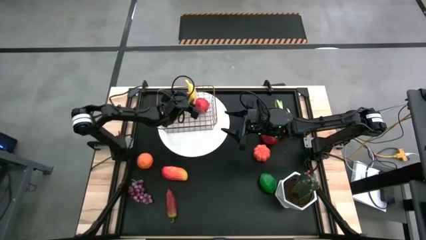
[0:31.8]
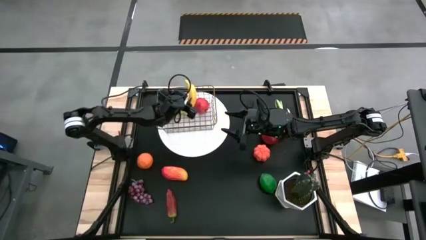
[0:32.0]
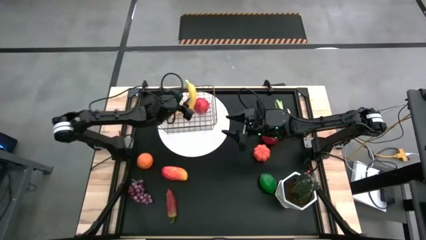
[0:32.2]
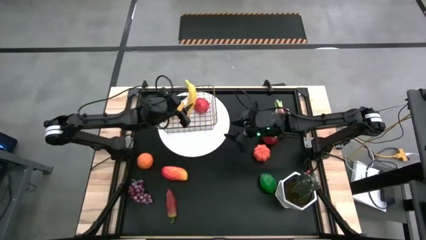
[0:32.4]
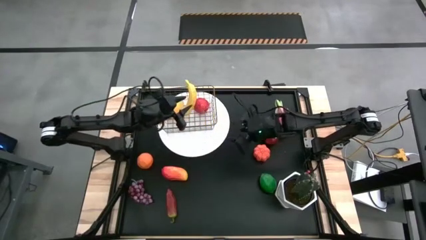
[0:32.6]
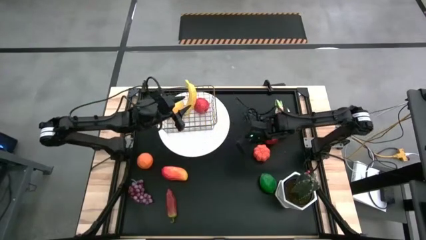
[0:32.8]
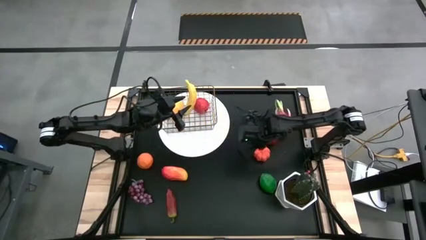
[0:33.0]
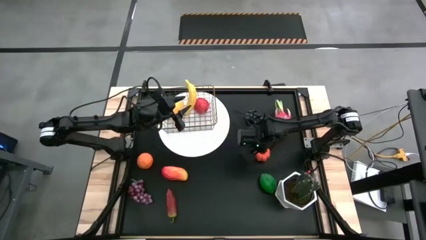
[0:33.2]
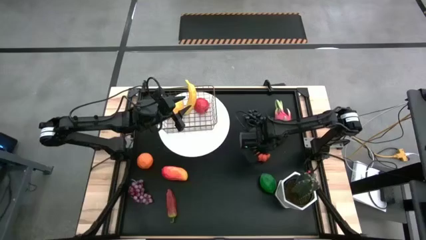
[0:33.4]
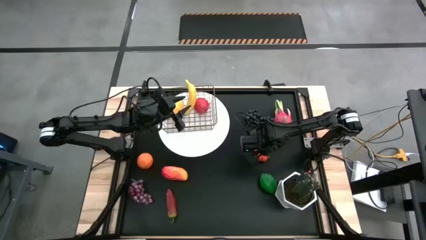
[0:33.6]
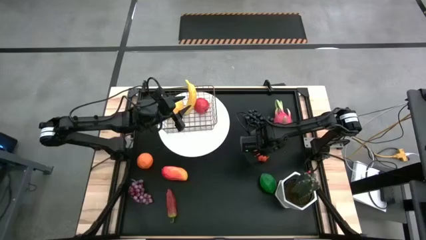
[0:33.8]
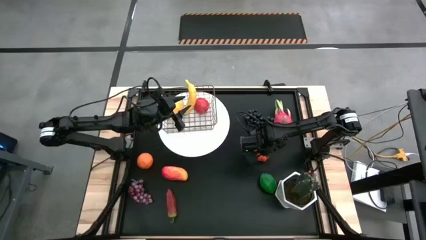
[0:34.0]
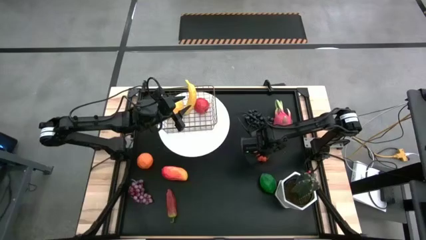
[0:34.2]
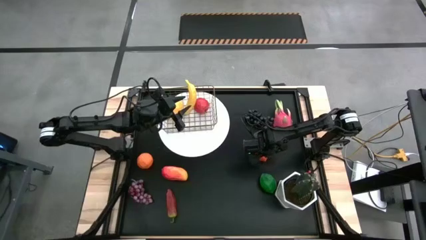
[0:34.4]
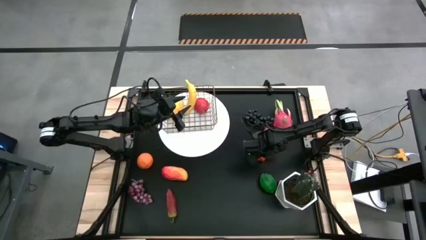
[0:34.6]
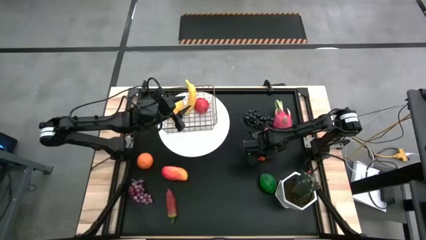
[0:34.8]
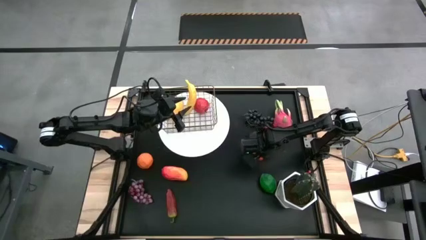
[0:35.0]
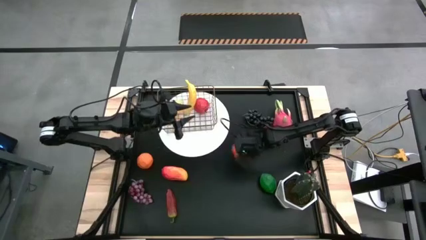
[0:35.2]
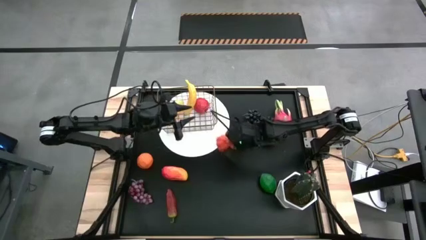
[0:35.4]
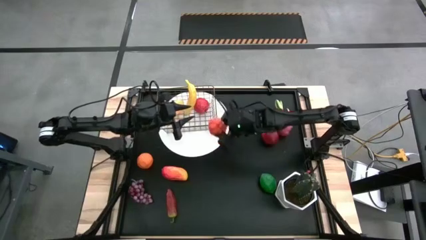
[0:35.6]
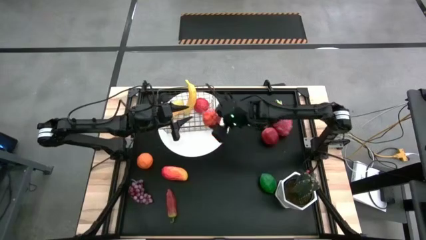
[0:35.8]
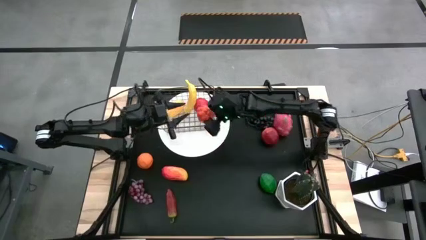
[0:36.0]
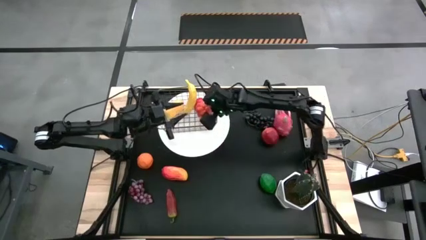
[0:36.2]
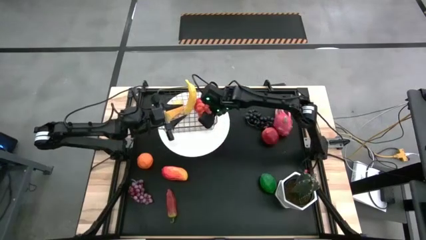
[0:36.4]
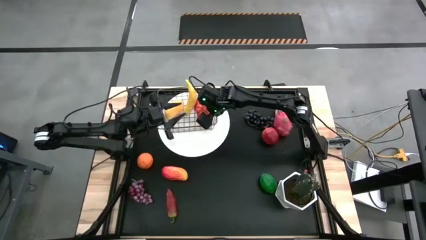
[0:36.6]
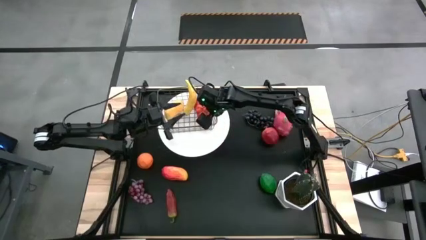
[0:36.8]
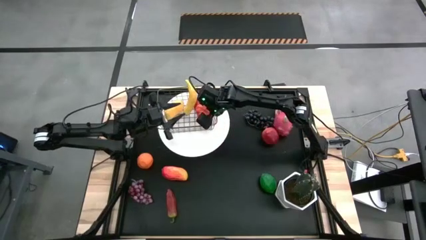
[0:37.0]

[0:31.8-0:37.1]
Task: Build produce basket
Put the tangerine into the wire basket

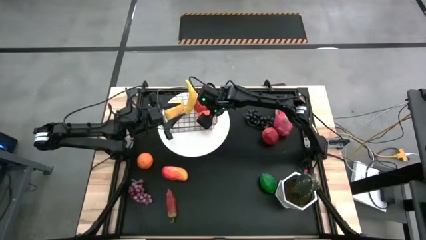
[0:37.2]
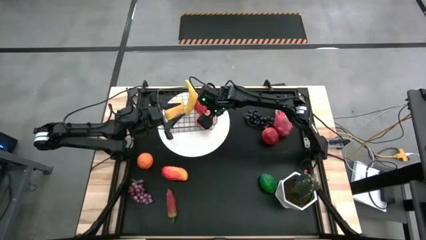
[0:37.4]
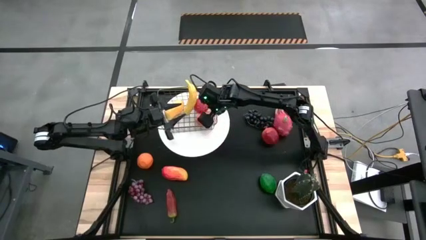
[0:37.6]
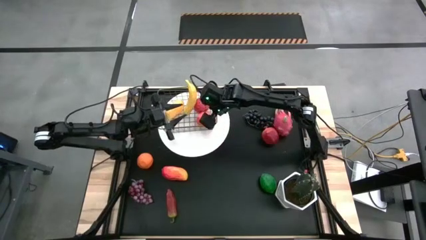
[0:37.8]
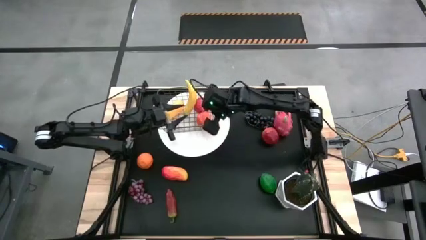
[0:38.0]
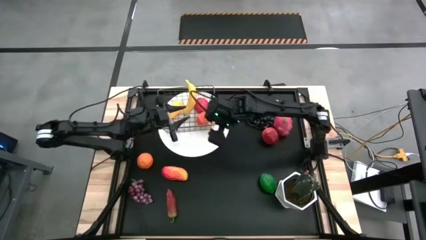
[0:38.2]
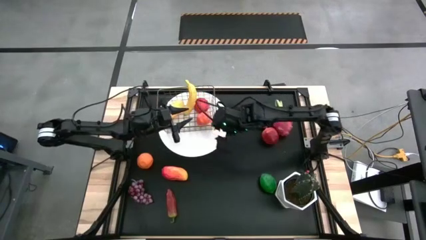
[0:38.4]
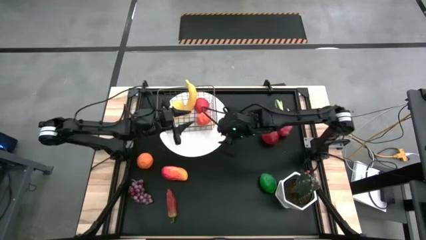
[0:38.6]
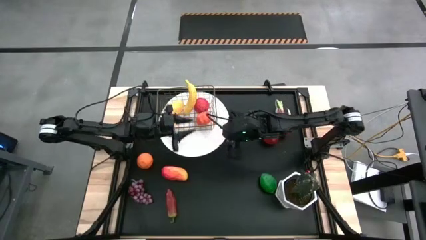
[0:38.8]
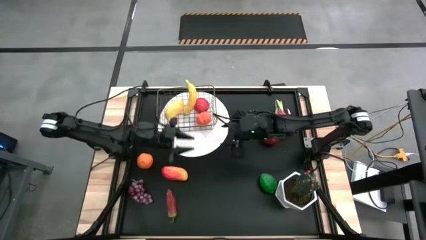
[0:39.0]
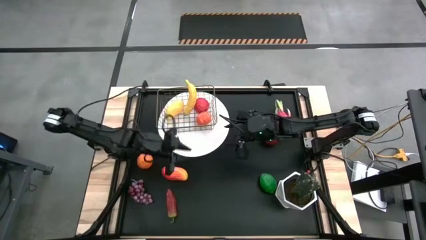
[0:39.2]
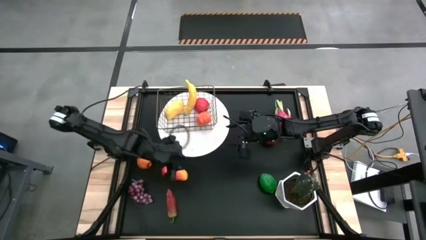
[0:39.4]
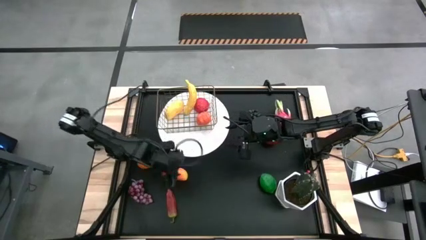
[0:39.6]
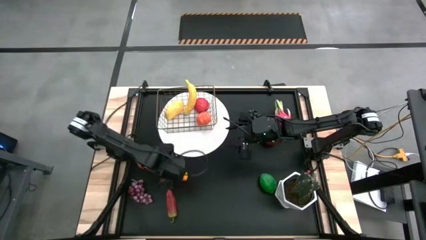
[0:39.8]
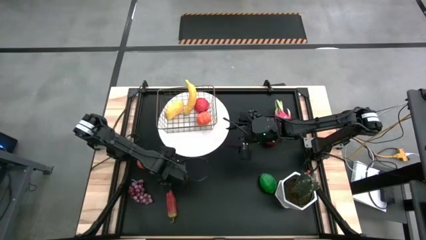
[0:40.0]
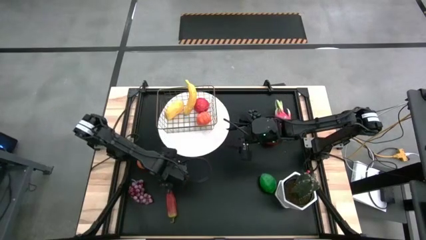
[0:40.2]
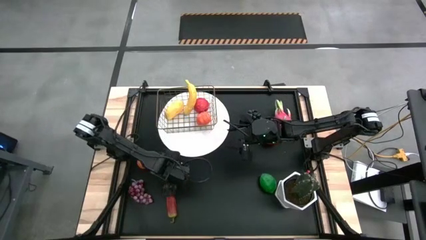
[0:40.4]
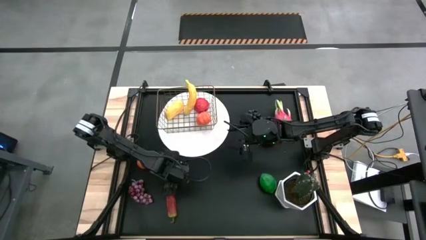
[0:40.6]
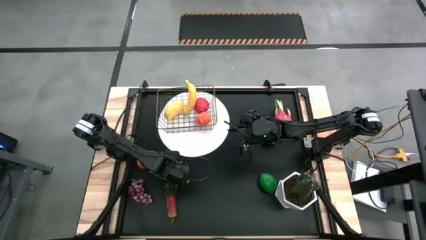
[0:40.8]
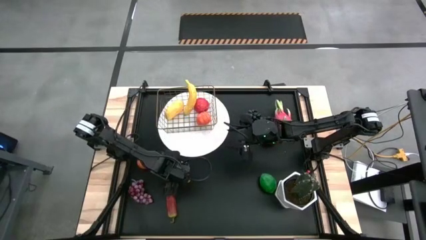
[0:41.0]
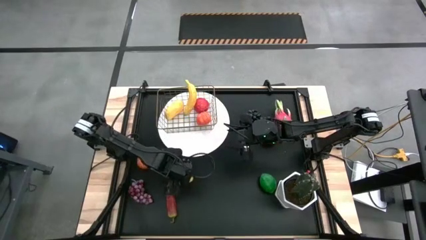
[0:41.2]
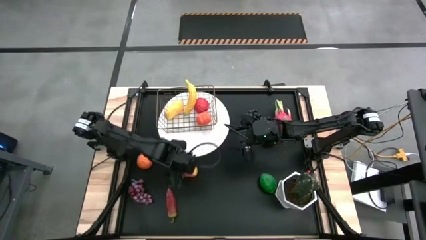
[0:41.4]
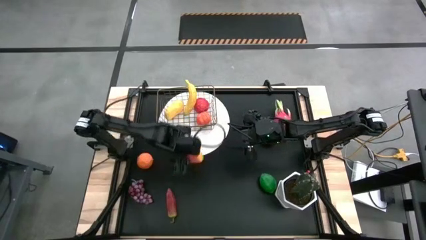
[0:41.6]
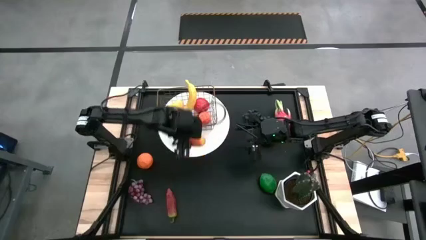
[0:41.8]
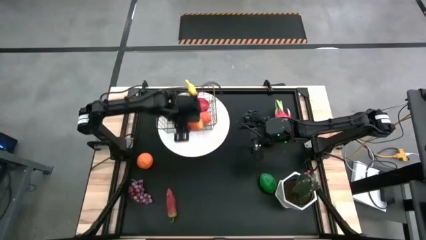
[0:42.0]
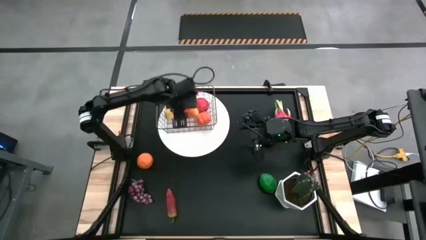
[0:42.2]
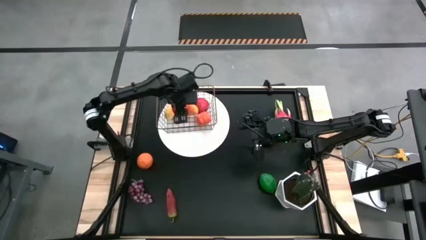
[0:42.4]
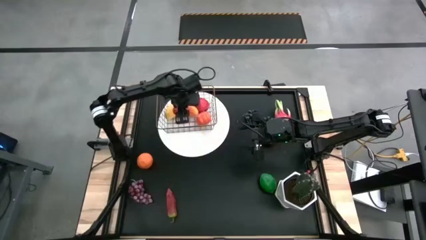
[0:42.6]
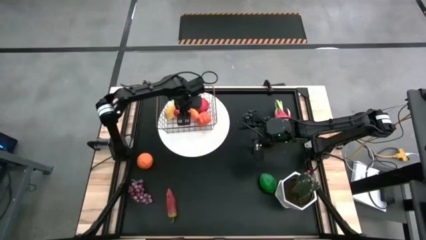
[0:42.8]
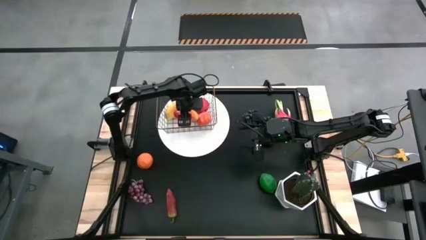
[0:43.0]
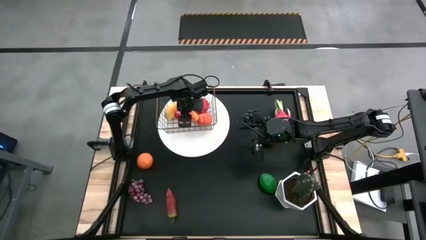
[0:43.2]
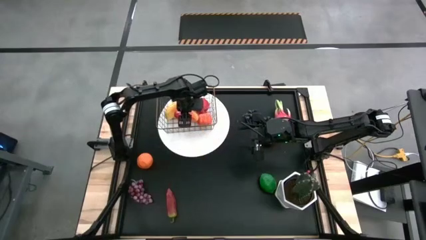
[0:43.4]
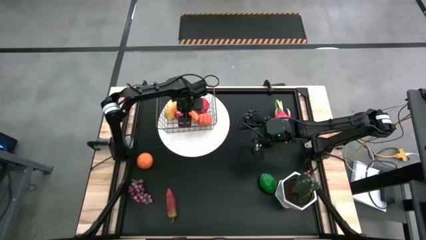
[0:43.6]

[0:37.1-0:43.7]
Put the orange mango into the wire basket

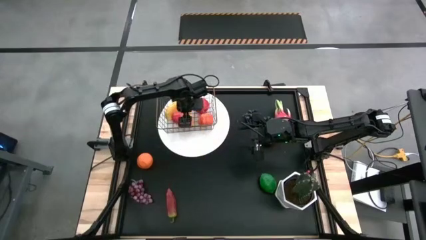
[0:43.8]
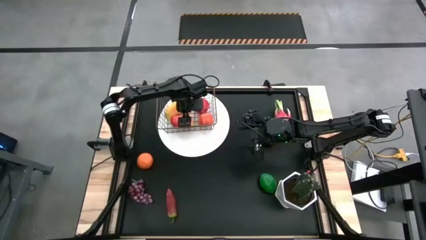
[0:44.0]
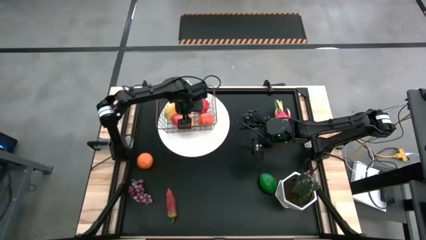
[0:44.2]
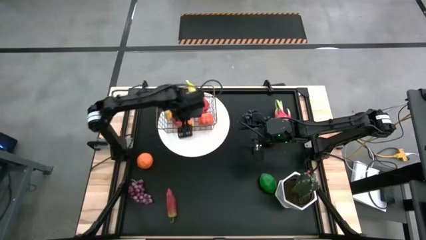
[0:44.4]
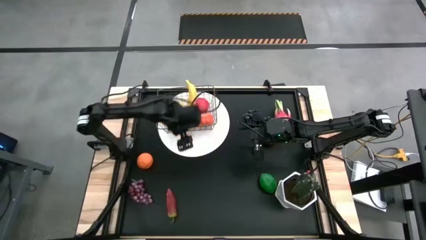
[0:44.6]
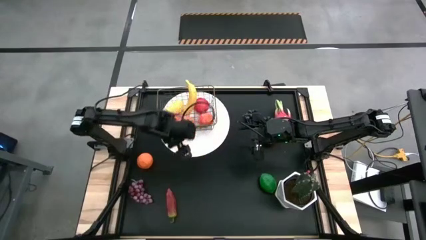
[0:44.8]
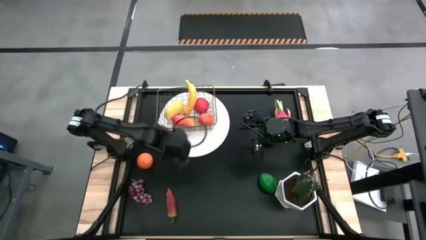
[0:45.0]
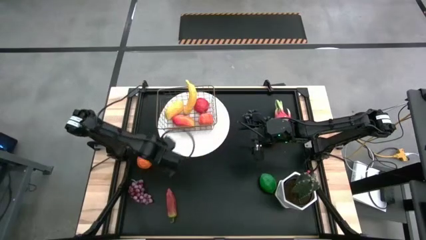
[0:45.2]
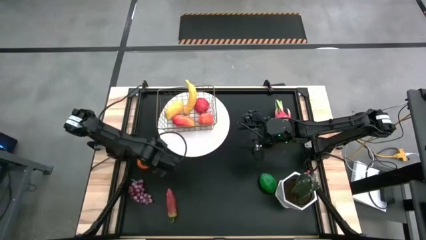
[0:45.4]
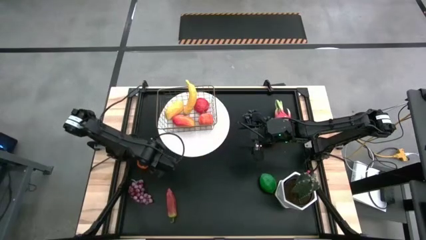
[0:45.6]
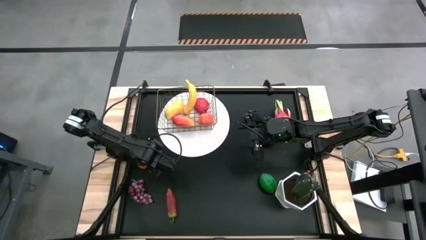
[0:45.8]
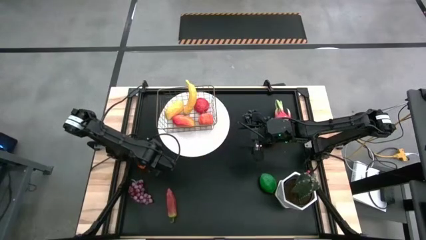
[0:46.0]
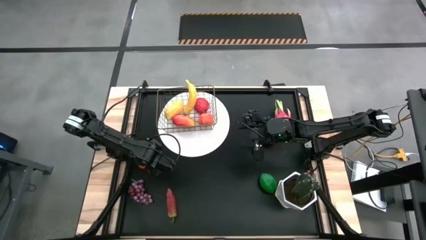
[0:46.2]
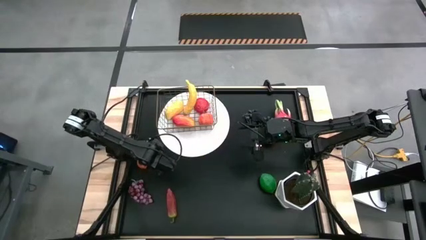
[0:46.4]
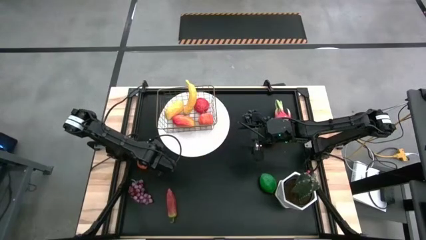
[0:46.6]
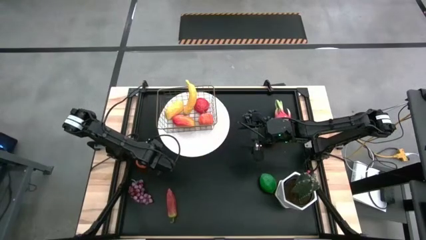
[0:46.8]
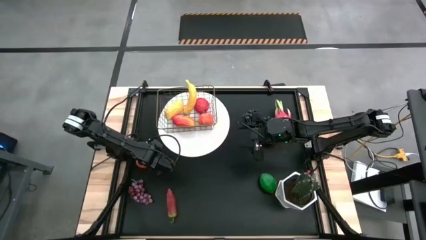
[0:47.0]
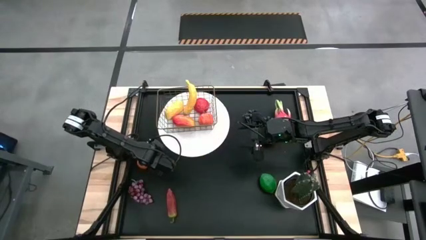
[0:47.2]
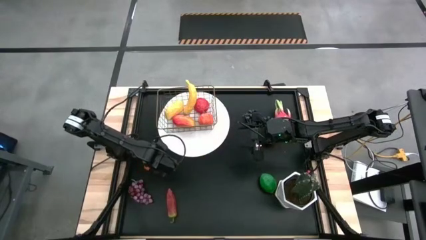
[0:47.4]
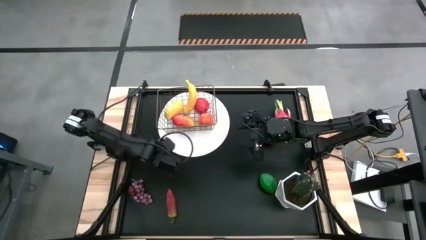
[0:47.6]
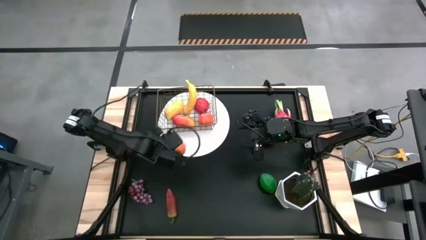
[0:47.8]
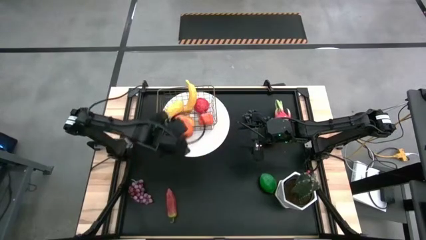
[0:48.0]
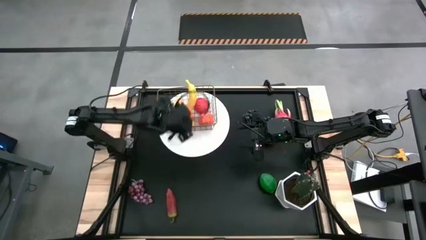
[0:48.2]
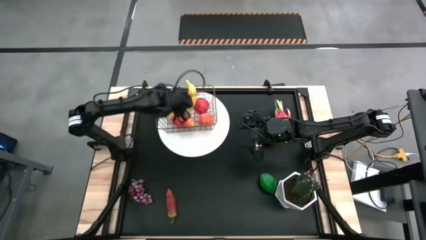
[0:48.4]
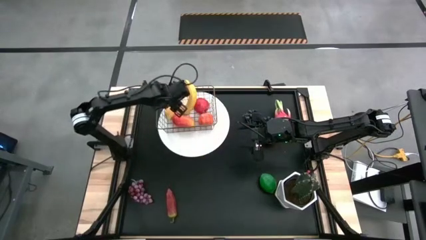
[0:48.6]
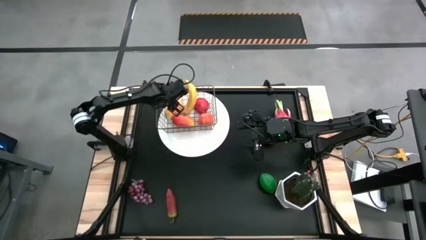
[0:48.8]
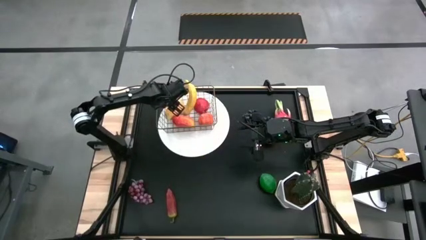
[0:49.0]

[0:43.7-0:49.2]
Put the orange into the wire basket
